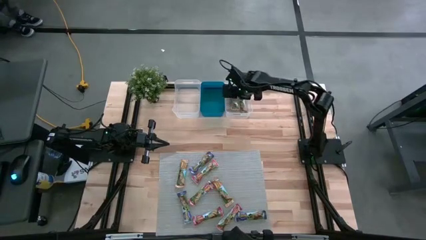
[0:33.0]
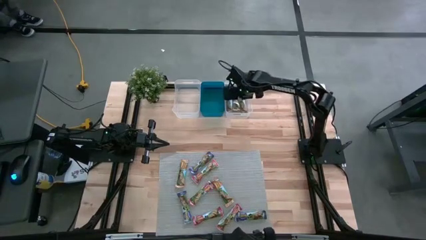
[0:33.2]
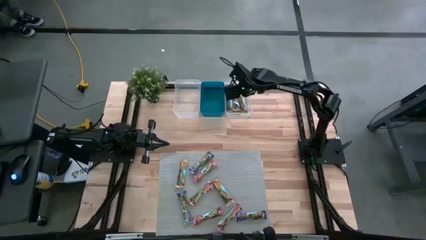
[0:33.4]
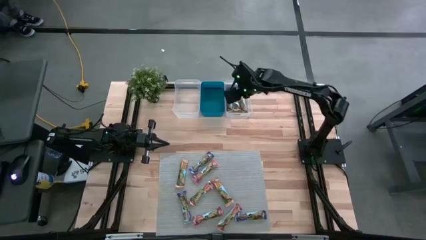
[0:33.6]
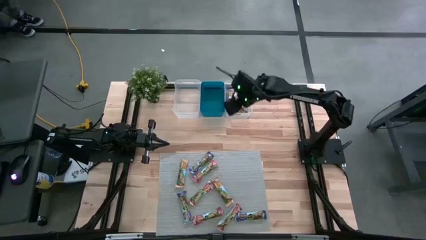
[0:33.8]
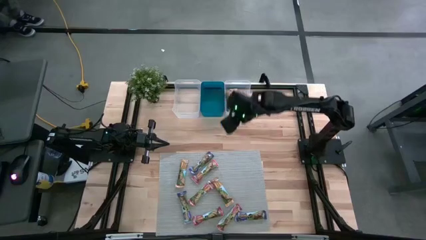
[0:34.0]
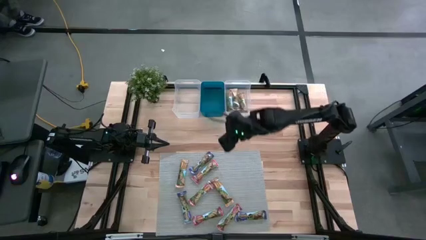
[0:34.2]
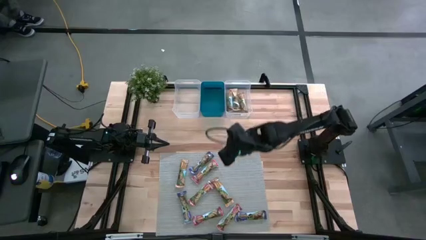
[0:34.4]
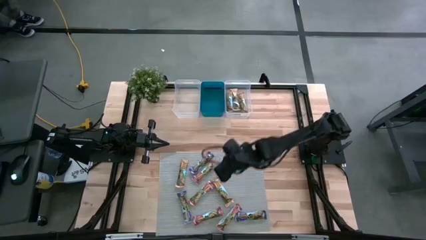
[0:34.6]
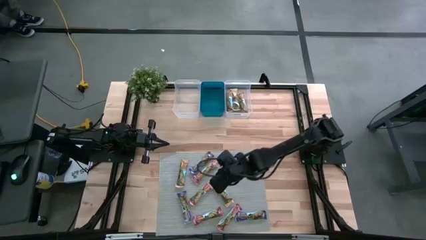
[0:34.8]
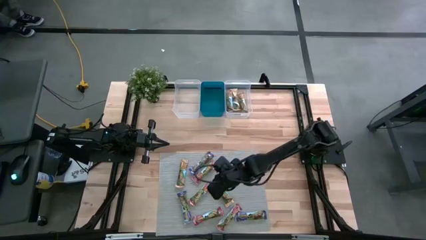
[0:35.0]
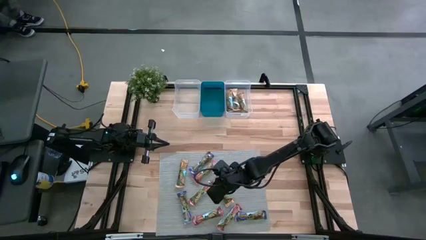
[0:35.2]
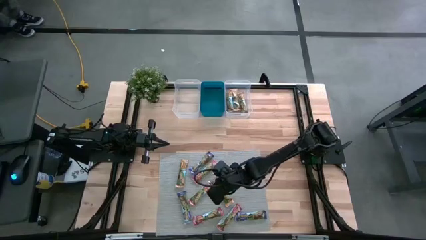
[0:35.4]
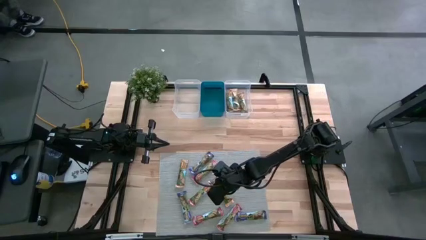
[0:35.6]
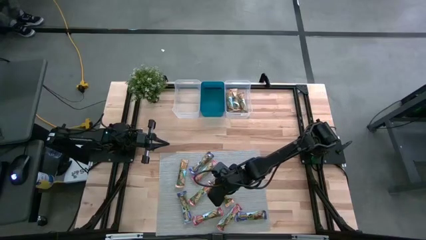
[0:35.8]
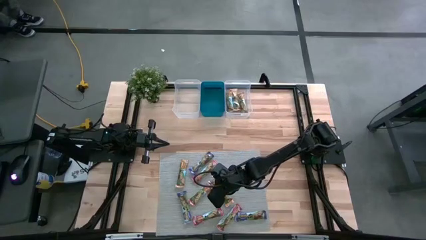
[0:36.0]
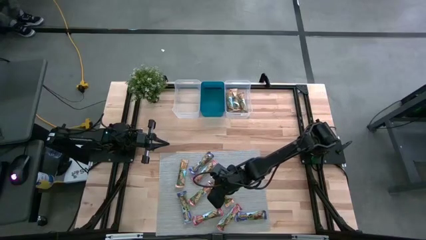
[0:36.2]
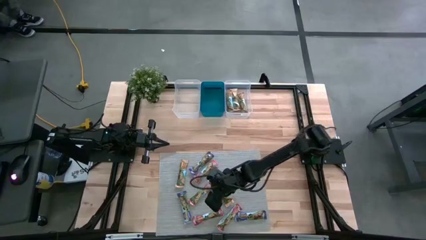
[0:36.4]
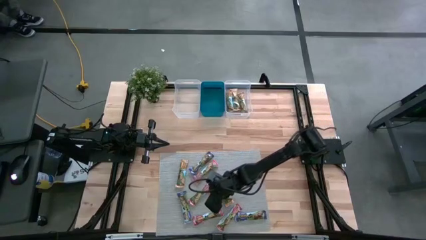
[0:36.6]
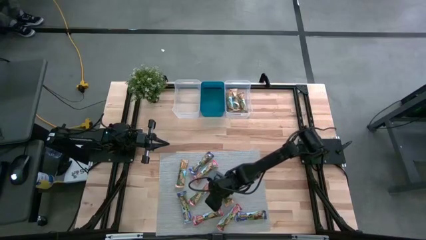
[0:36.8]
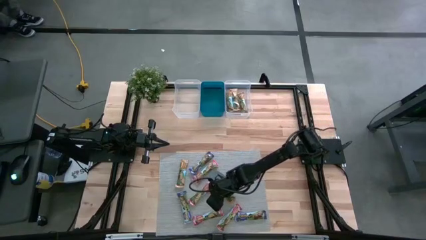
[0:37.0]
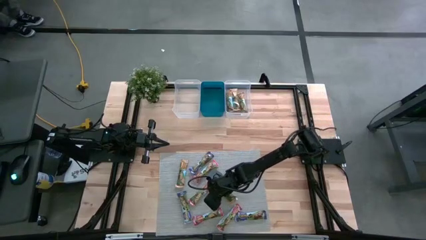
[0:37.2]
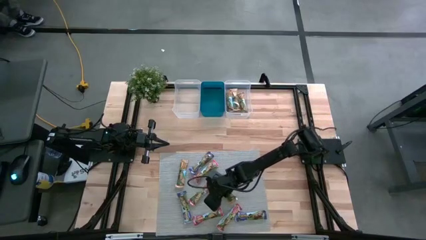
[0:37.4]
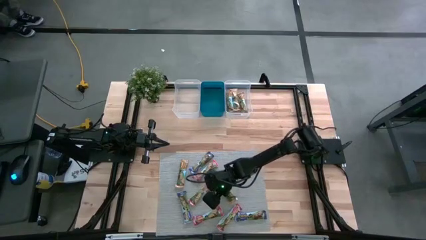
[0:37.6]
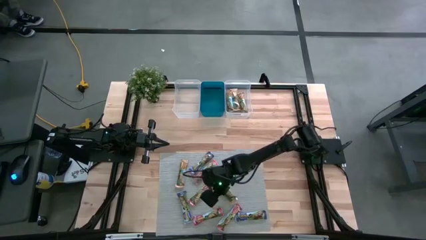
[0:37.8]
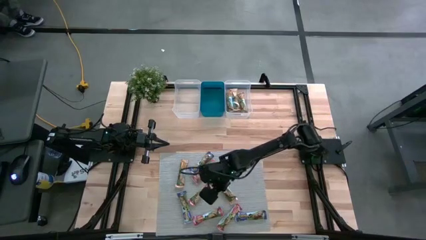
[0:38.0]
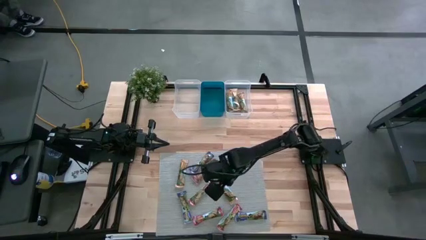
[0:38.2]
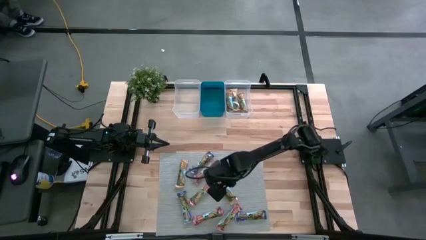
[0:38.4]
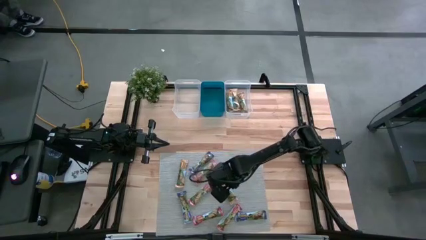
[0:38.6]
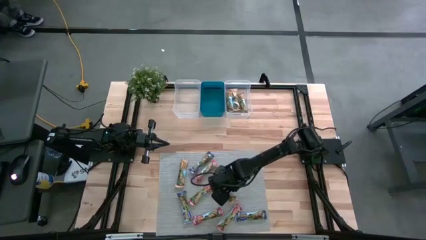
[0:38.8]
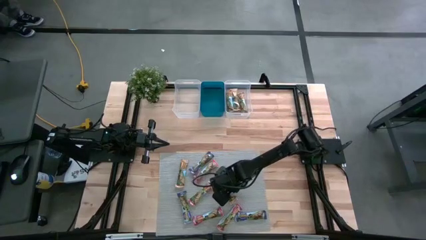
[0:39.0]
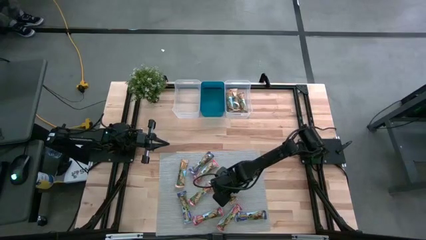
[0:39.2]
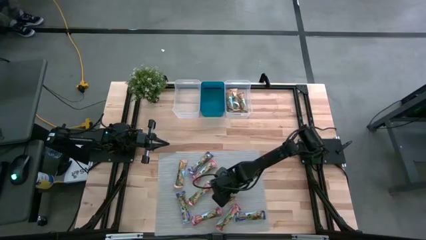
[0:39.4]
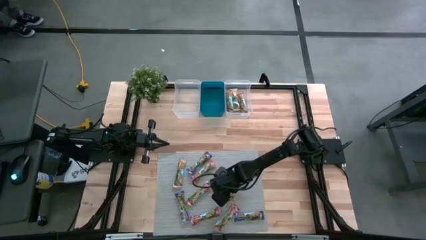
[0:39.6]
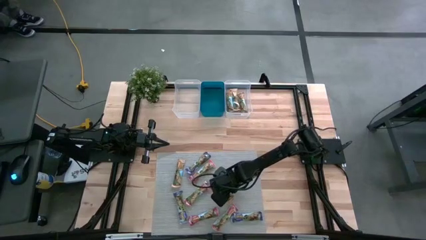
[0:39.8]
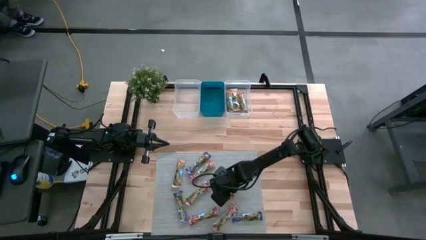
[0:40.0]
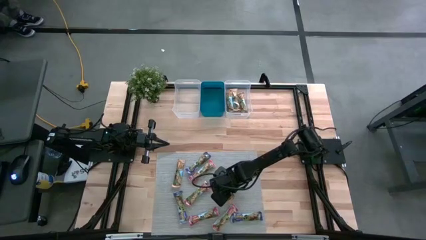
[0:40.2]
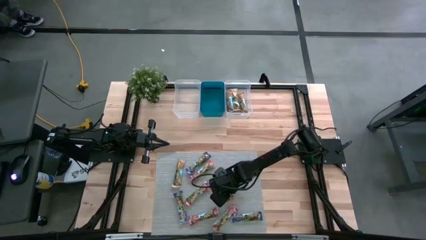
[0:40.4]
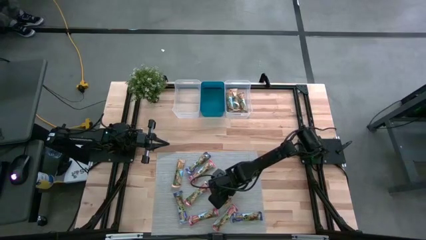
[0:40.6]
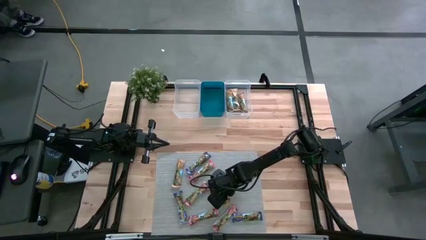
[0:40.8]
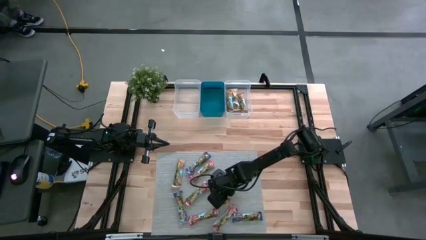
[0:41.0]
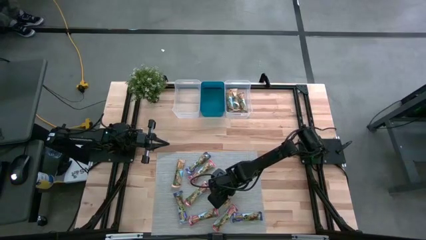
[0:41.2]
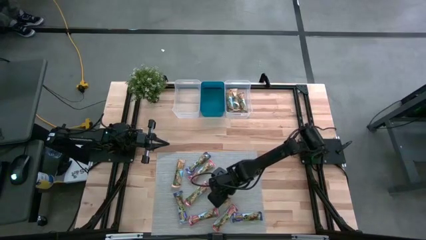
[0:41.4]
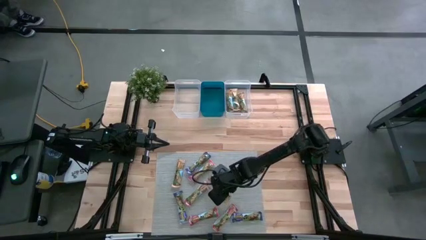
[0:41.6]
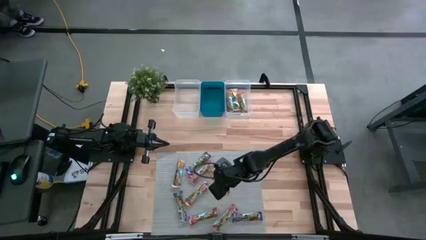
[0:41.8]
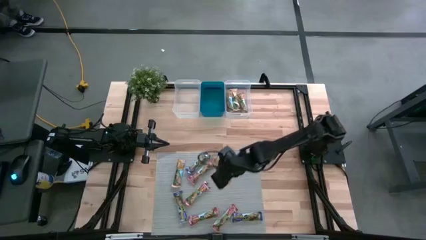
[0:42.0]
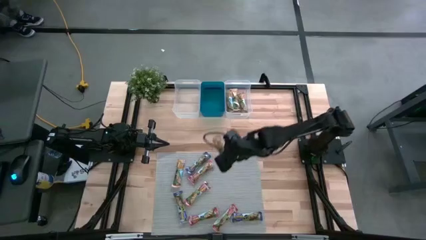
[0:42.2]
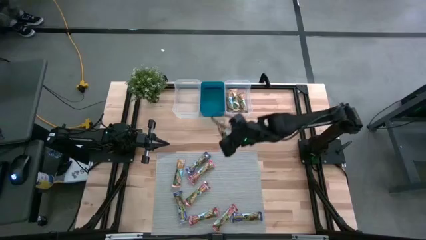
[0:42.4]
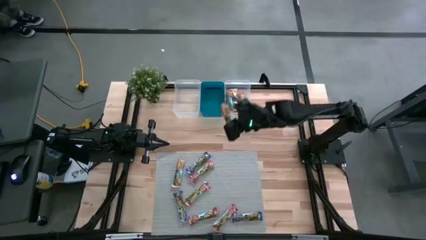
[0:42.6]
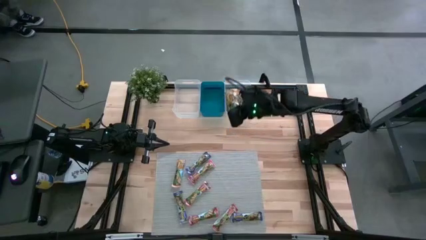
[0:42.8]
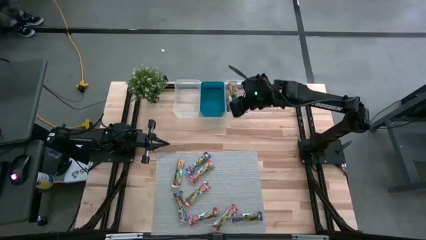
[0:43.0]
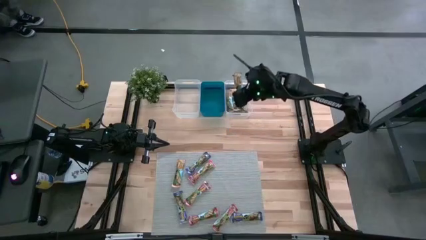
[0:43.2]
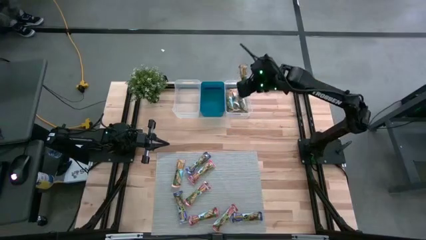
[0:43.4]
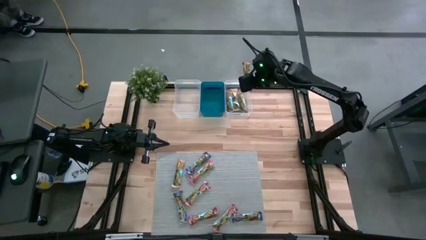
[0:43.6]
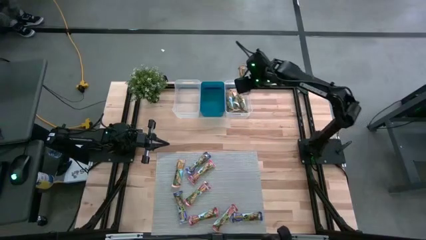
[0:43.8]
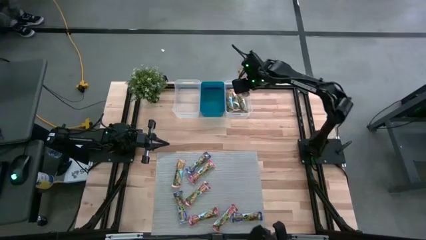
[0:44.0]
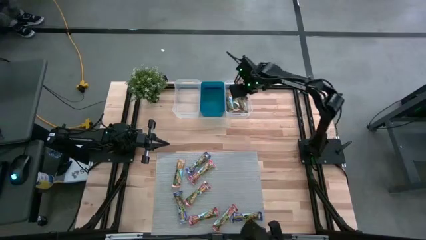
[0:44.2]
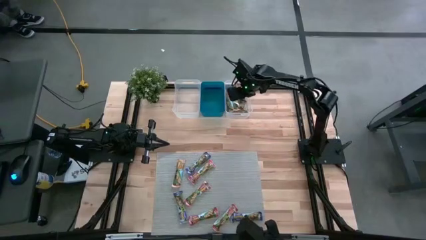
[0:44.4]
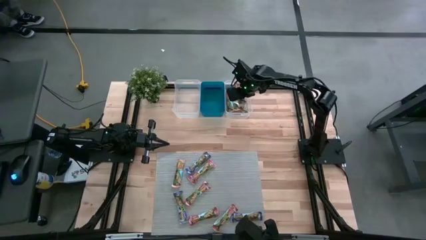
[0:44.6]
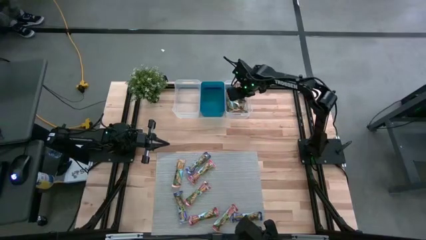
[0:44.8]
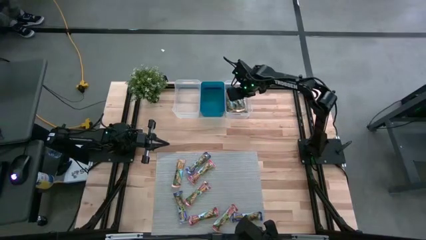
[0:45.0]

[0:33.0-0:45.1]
Task: Pick and place Granola Bars by type
Put the orange granola bar into the right transparent bin

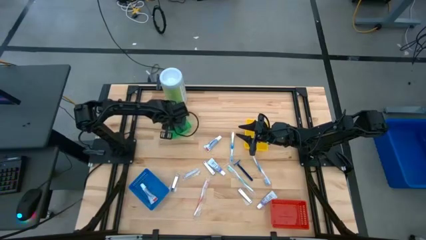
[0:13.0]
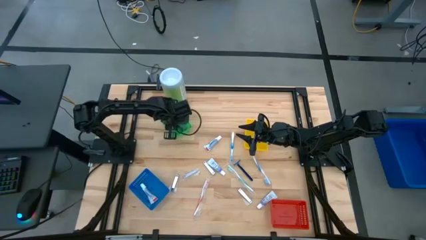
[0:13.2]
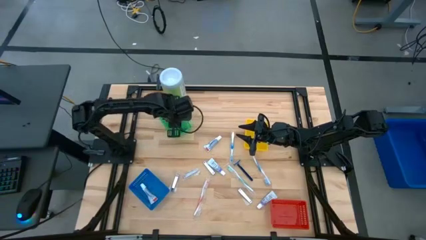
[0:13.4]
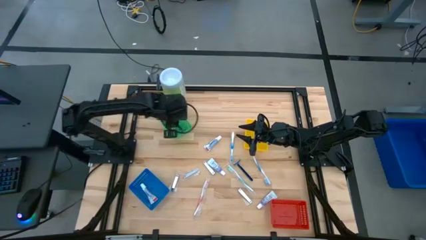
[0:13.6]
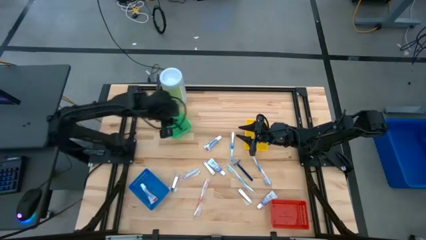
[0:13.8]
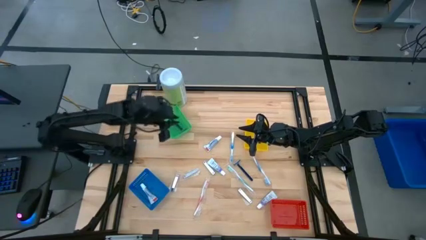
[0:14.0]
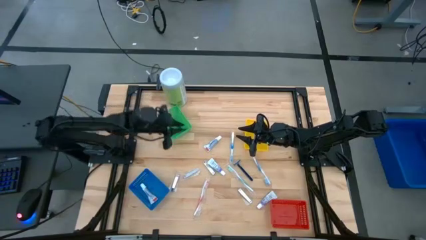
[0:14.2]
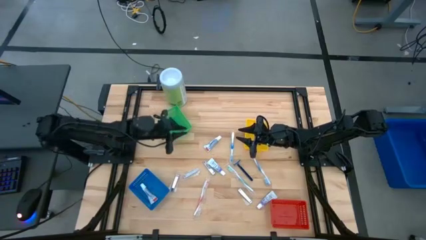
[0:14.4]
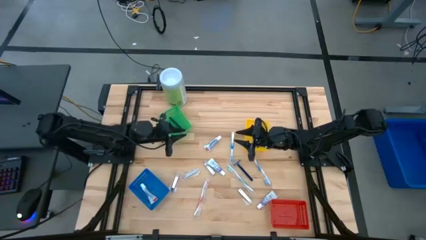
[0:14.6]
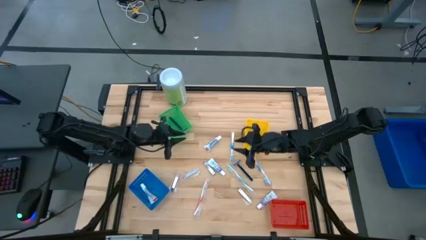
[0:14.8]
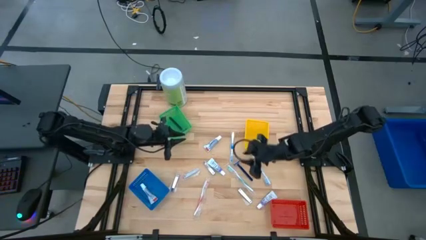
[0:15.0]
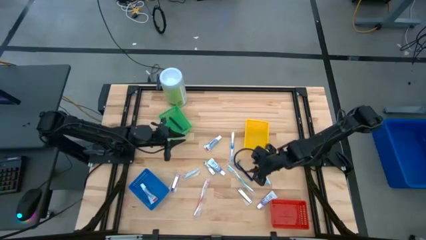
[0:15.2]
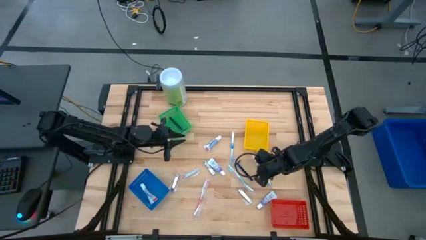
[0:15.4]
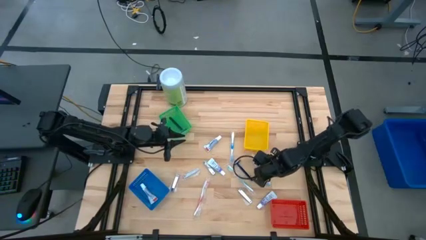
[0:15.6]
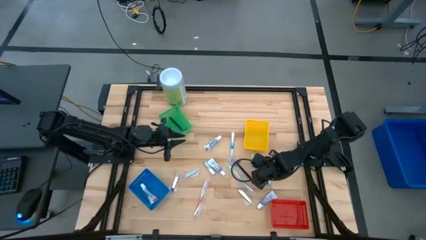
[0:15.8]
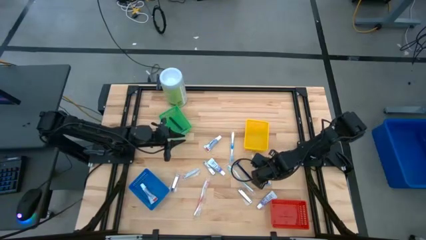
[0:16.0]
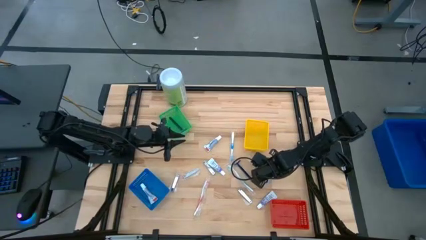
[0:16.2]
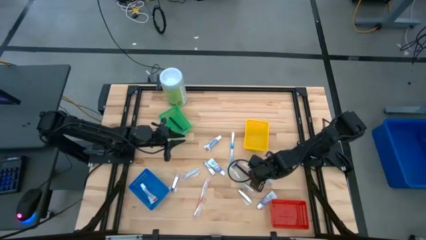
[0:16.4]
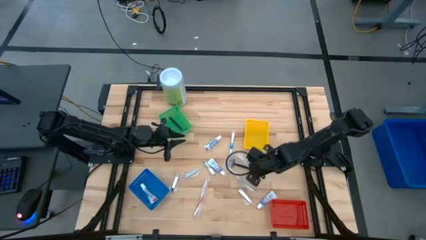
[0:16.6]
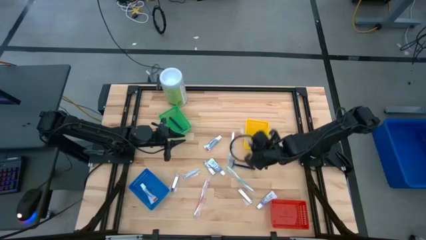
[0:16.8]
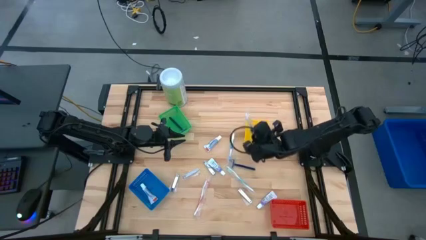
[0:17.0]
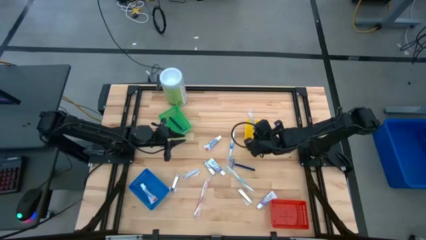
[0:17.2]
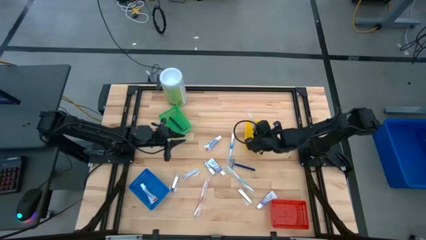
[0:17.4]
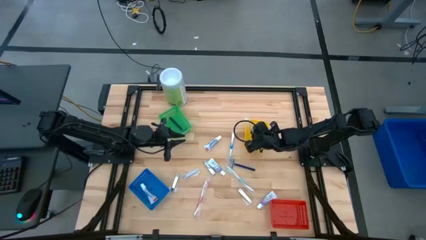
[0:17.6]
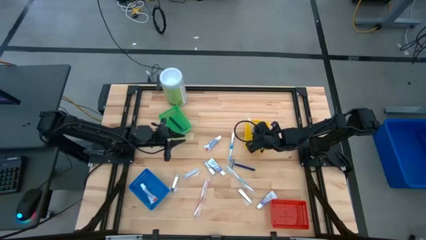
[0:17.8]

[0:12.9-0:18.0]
Task: Pick & Place Travel size toiletries
Put the right blue toothbrush into the yellow bin
